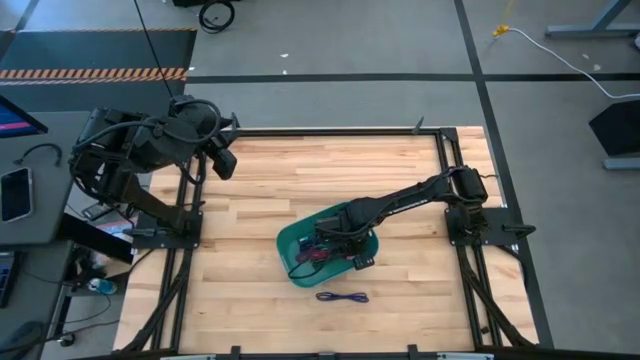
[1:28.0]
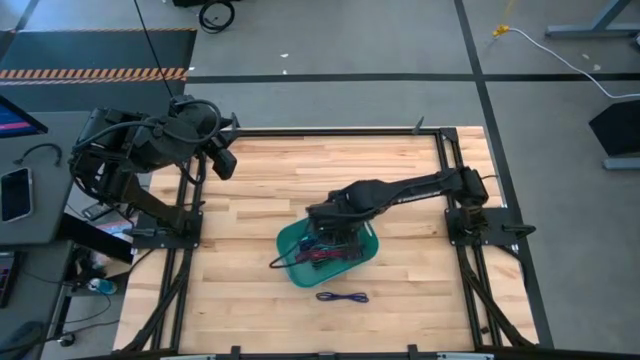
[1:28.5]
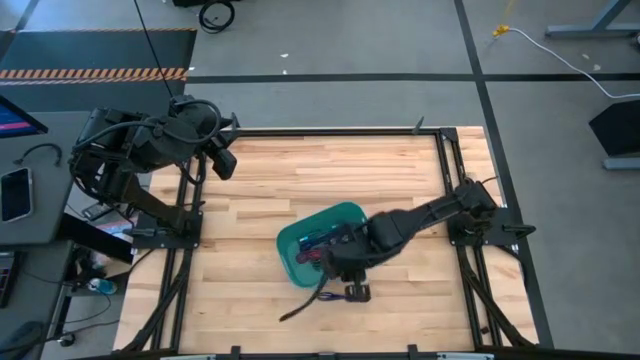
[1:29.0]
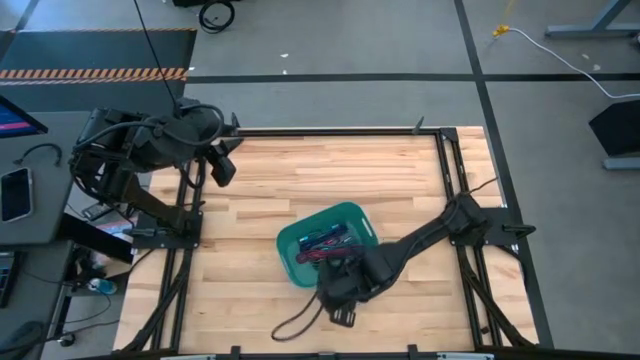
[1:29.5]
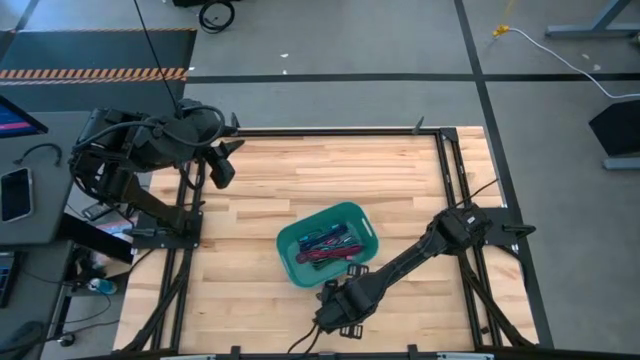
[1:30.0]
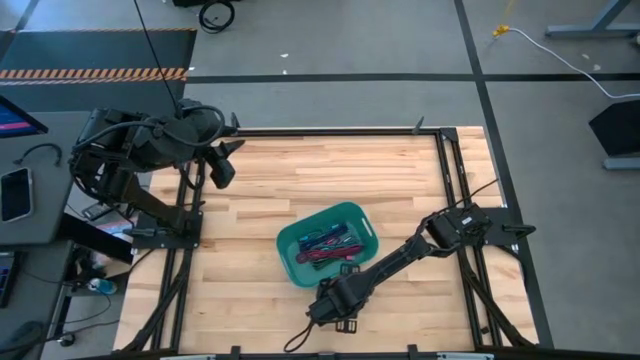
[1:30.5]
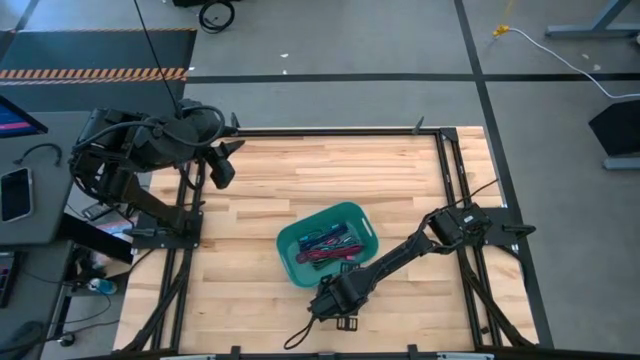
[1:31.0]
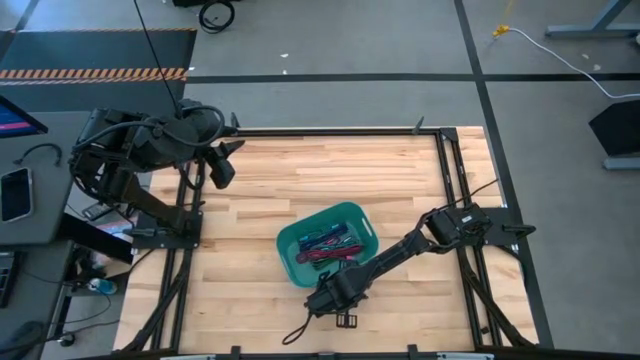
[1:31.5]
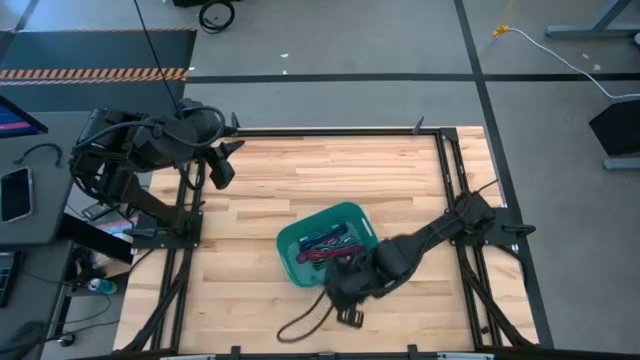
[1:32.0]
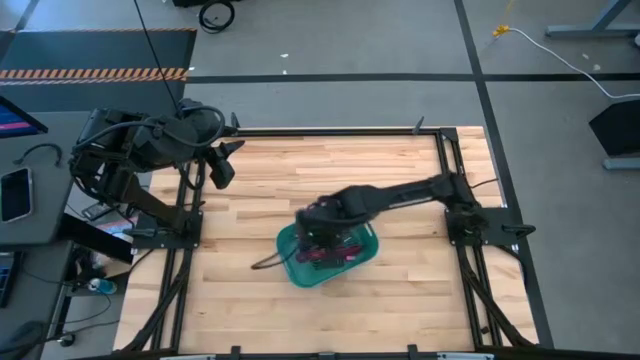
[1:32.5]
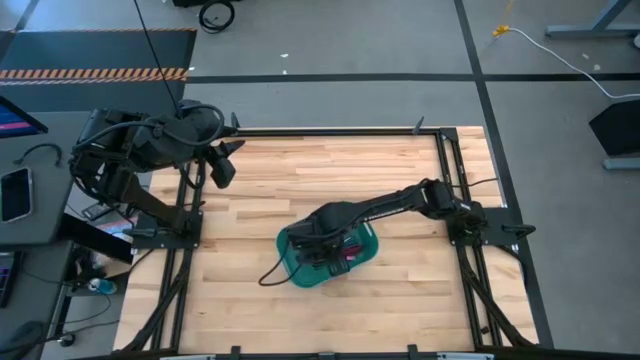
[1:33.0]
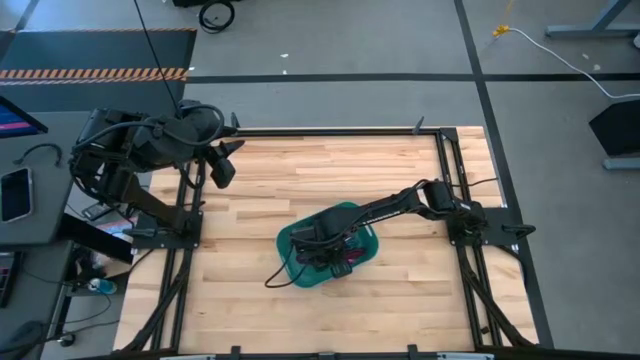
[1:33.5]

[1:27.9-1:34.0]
Task: Pick and place USB-C Cables
Put the purple charger cable into the blue bin

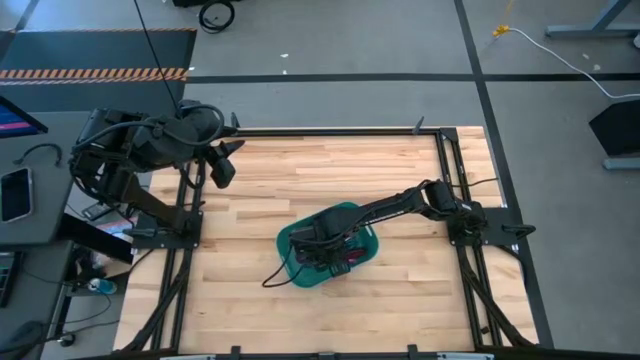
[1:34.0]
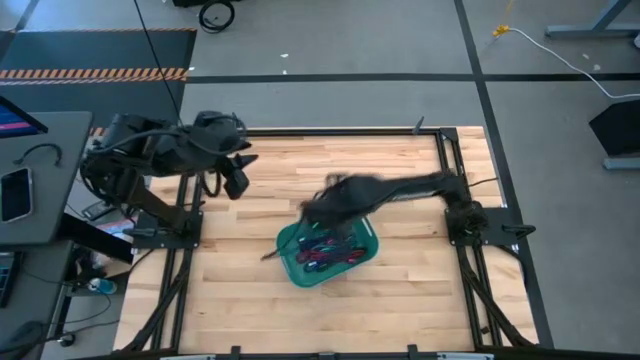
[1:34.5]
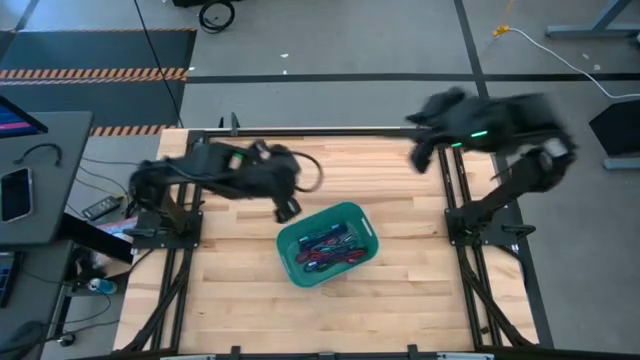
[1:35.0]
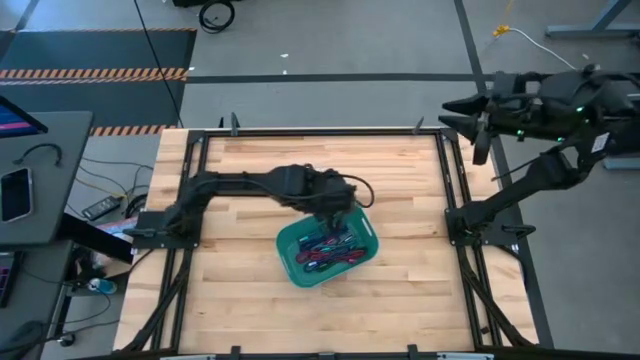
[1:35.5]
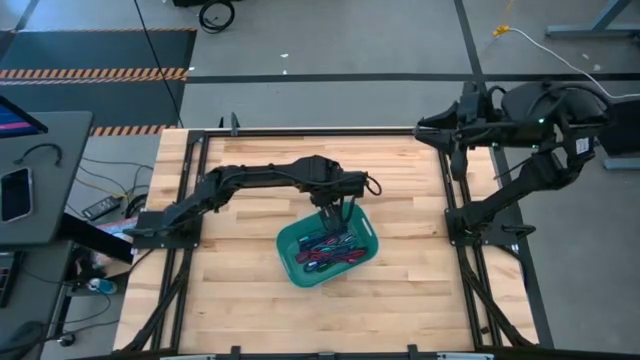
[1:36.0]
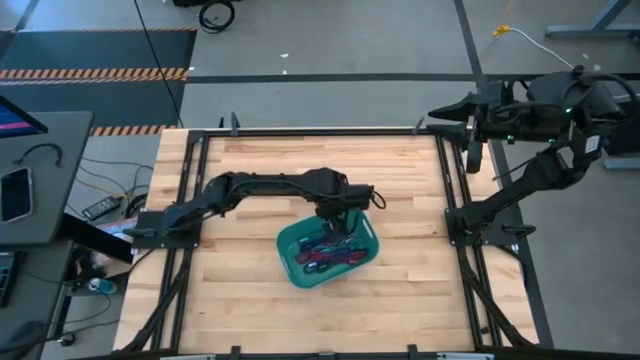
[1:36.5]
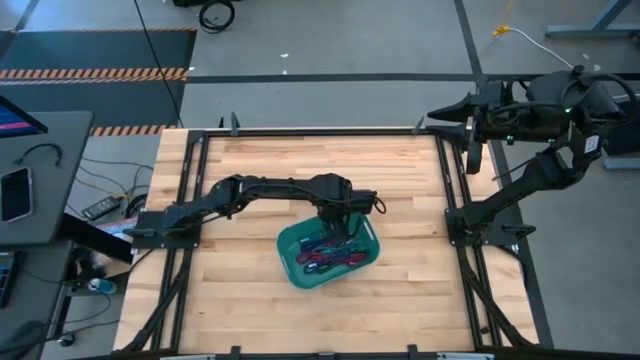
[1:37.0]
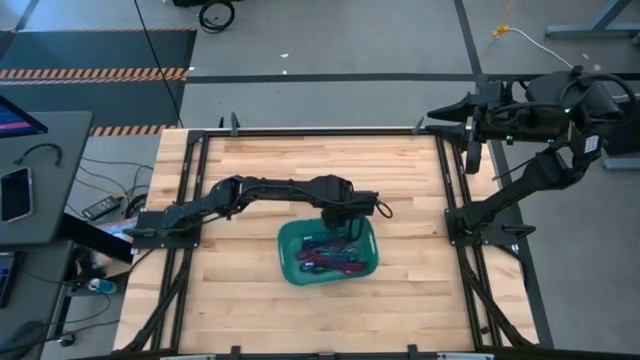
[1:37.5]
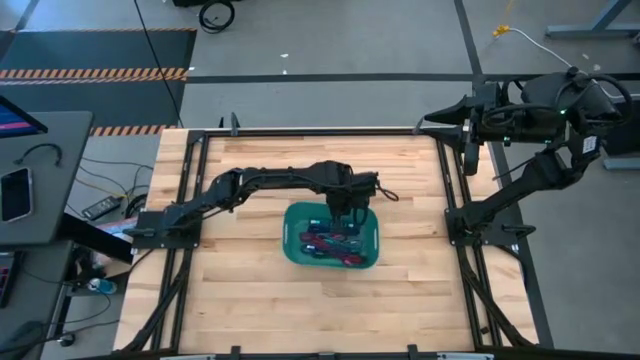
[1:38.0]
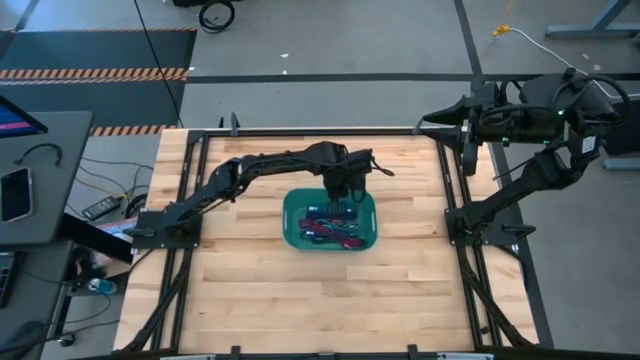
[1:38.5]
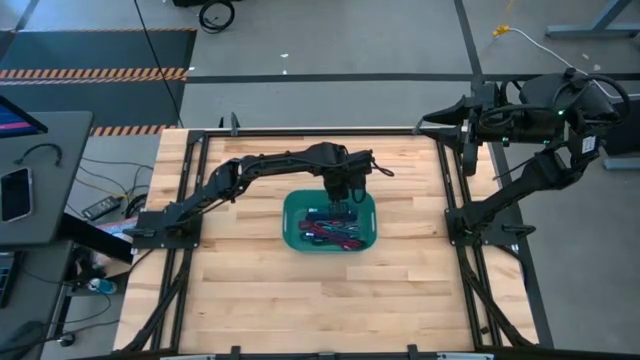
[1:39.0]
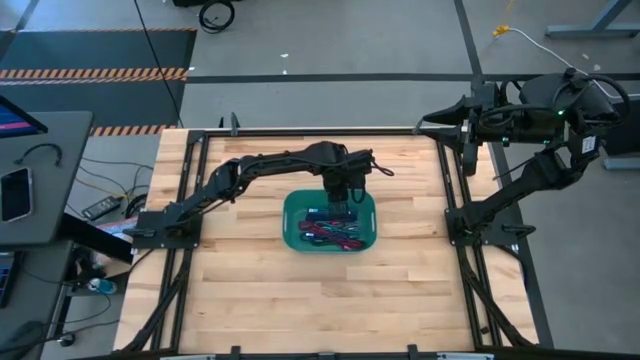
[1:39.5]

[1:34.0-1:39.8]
Adjust the blue bin on the table

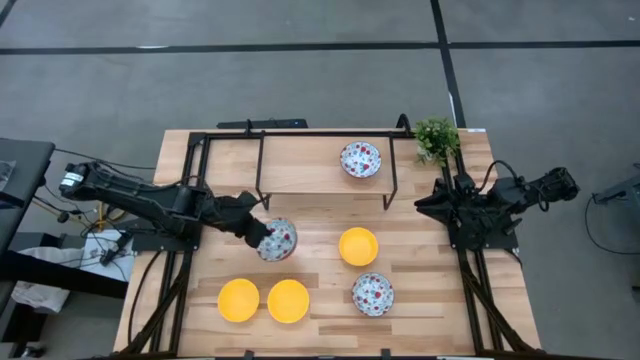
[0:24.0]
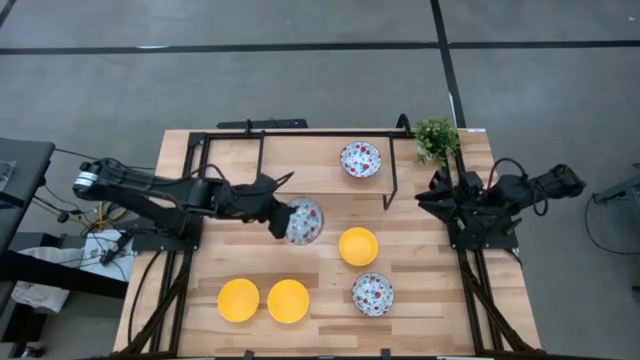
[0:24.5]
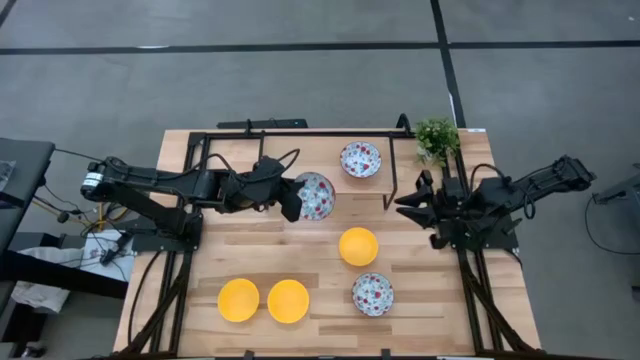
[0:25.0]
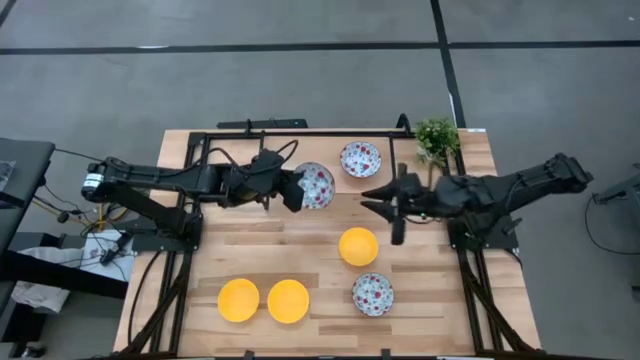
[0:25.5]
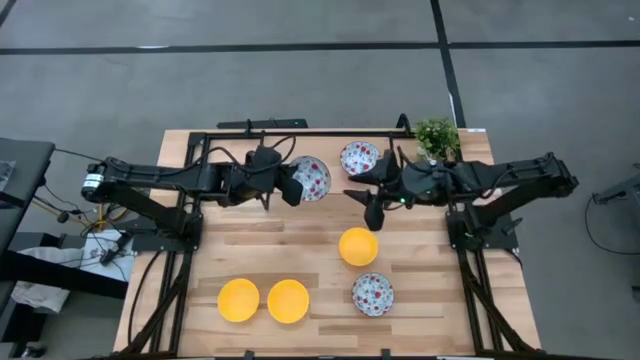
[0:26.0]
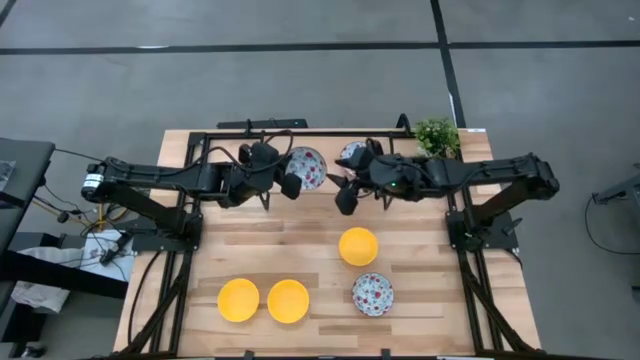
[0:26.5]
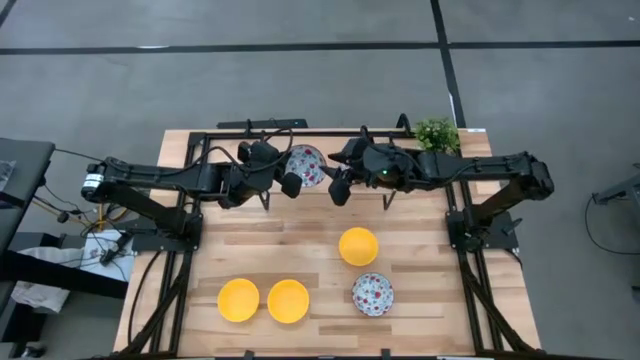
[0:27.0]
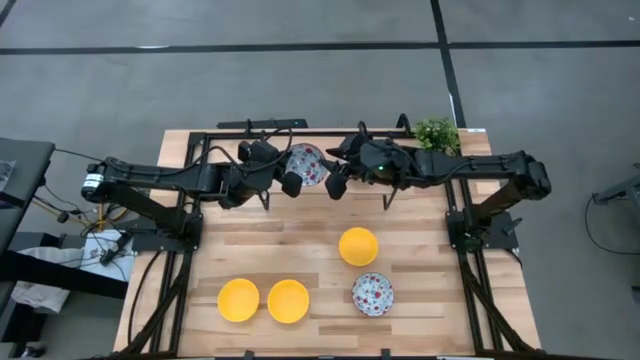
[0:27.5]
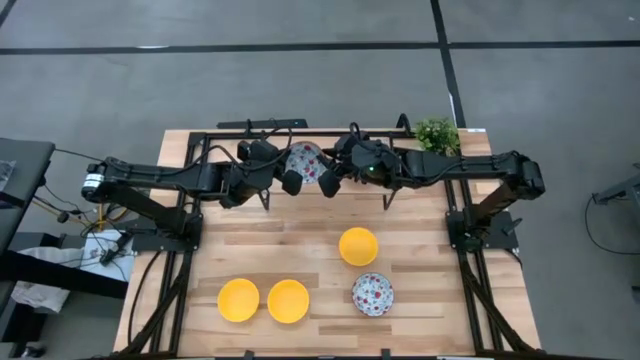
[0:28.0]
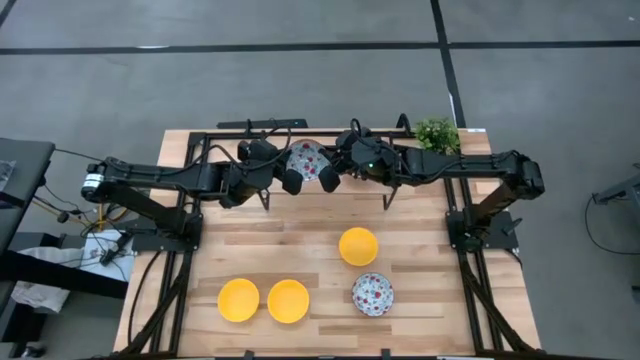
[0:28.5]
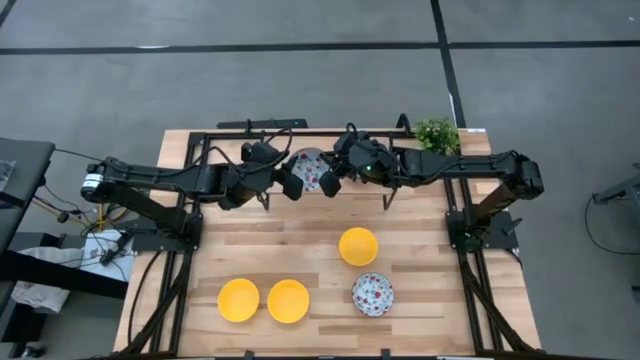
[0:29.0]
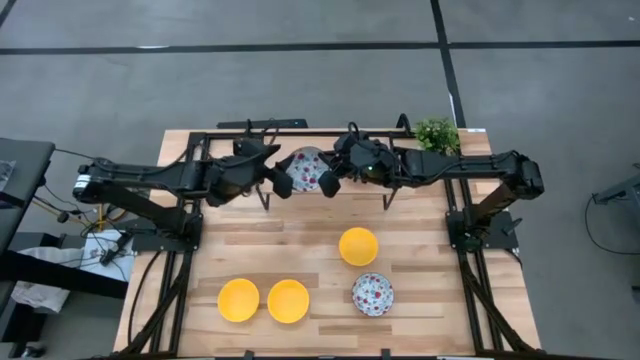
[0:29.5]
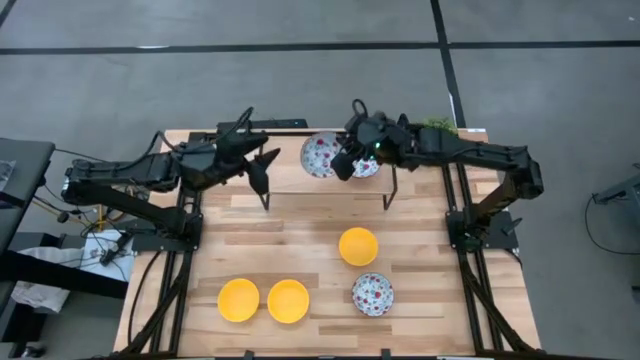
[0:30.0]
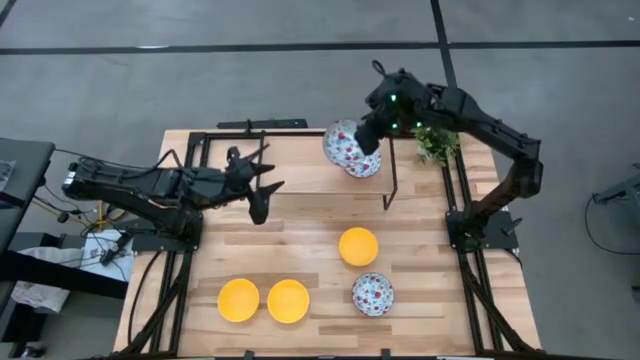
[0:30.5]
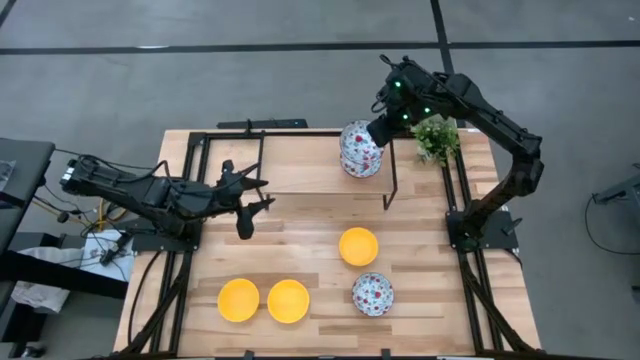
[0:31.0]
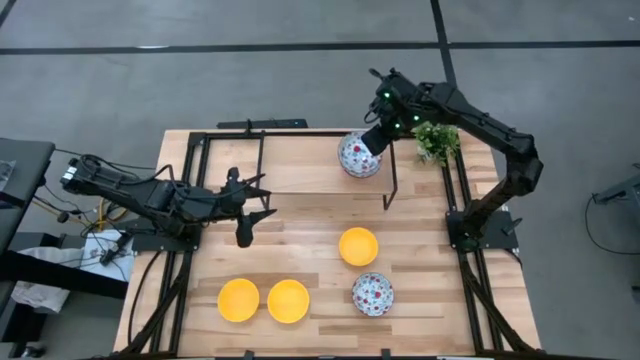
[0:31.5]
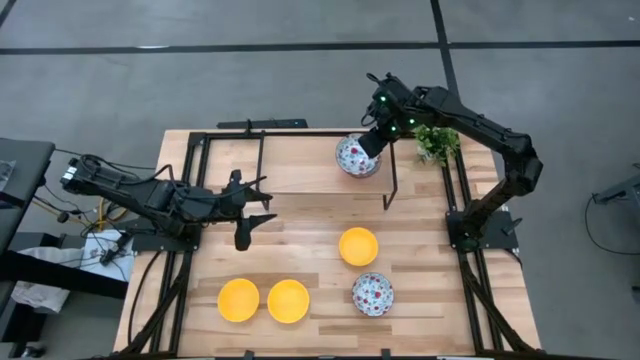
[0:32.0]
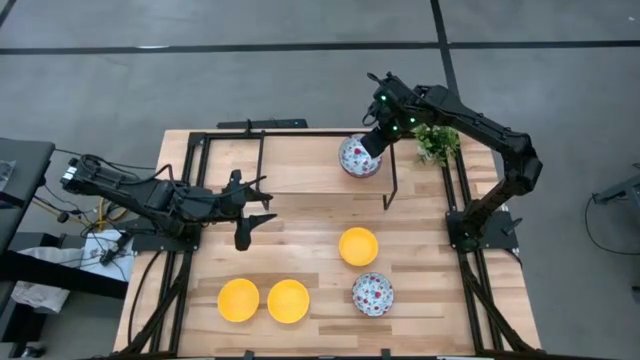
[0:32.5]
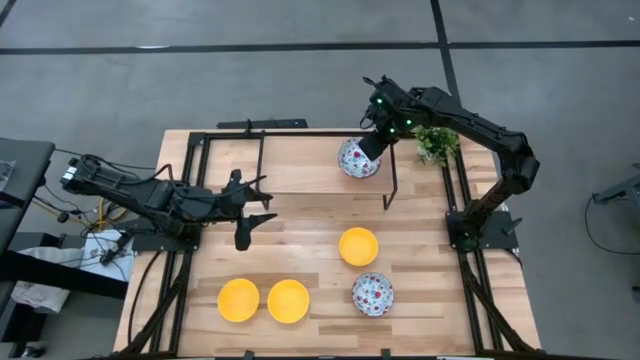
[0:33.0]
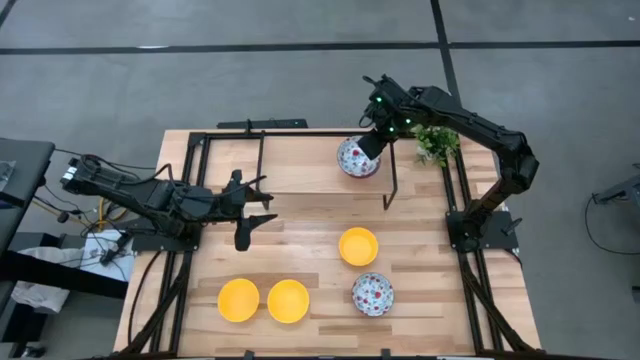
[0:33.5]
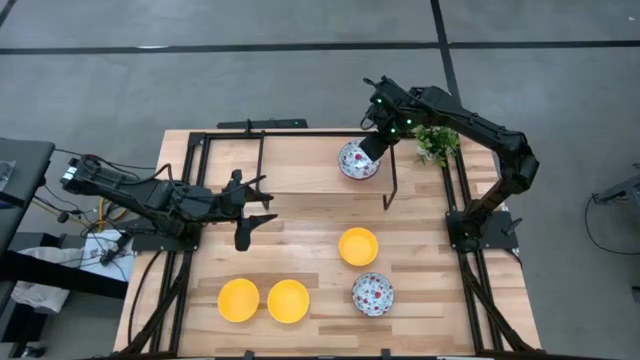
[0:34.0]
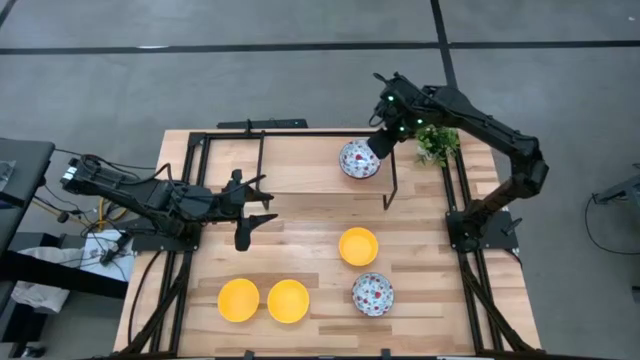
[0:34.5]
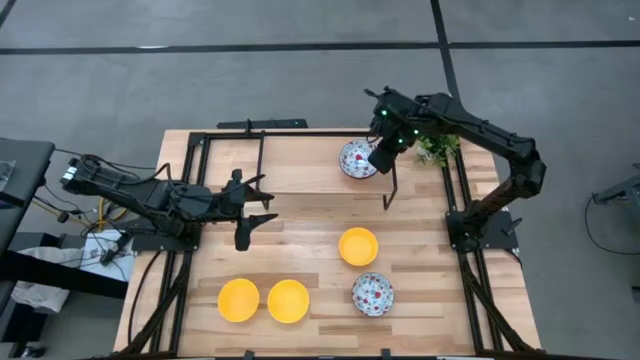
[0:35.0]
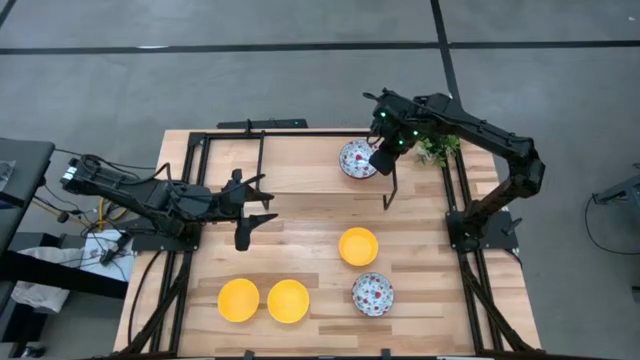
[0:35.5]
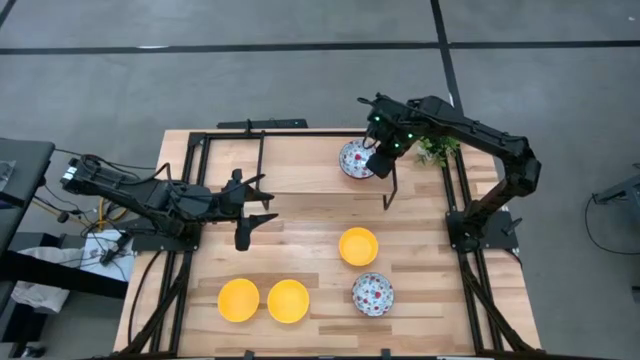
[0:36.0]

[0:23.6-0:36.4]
Task: Pick & Place Mini bowls
Stack the left red bowl on the red bowl on the shelf
